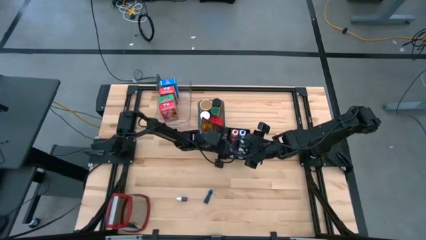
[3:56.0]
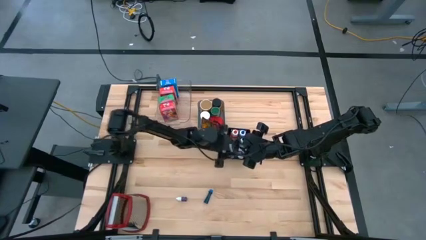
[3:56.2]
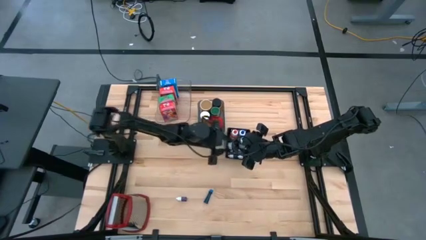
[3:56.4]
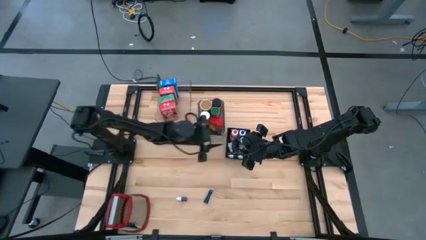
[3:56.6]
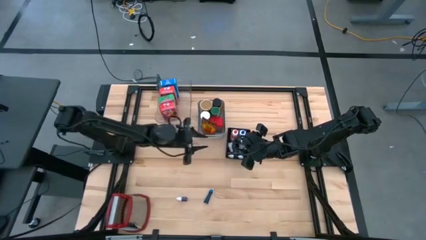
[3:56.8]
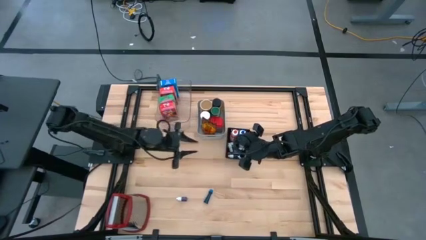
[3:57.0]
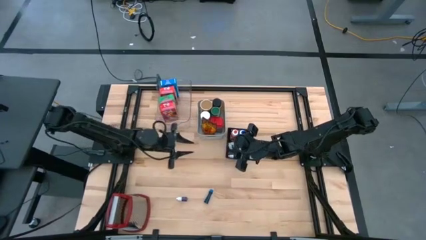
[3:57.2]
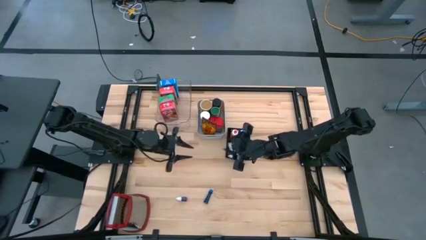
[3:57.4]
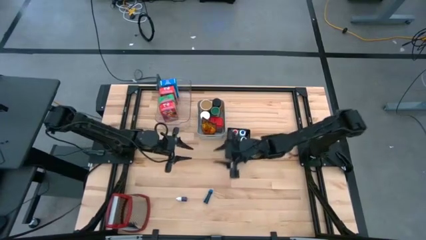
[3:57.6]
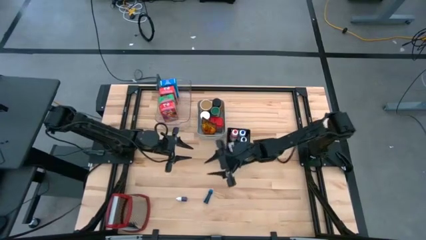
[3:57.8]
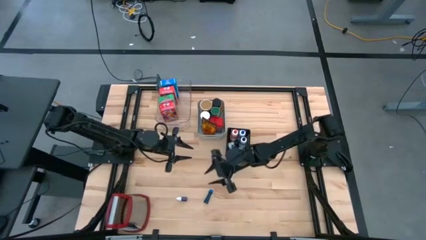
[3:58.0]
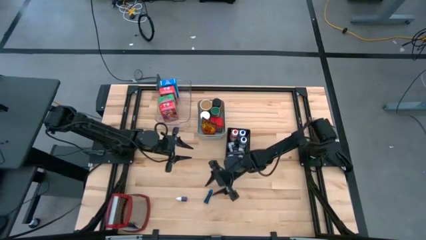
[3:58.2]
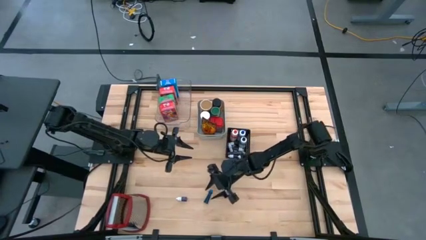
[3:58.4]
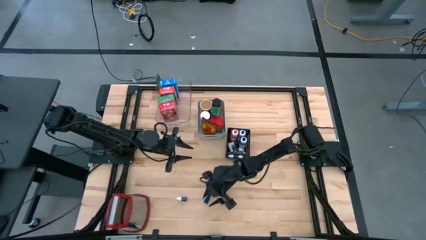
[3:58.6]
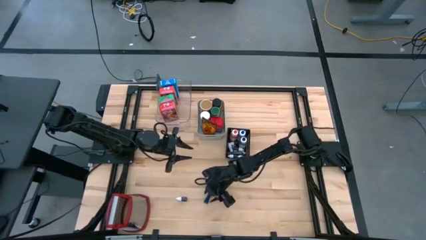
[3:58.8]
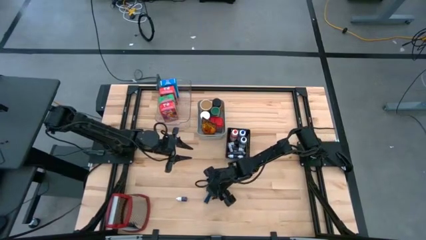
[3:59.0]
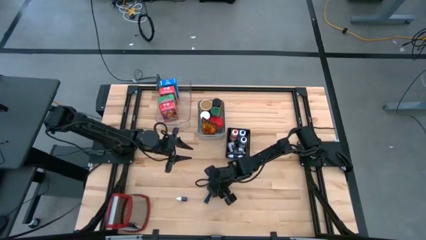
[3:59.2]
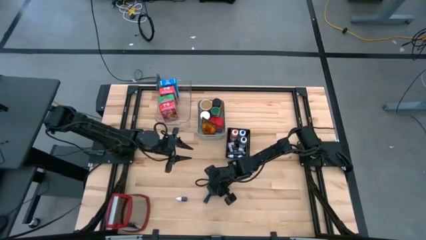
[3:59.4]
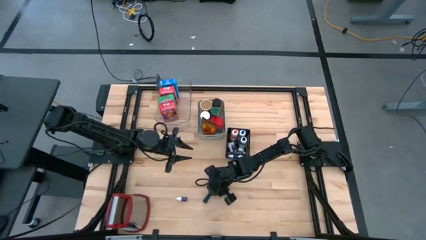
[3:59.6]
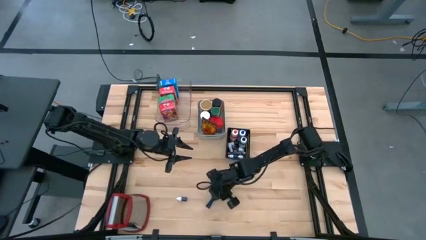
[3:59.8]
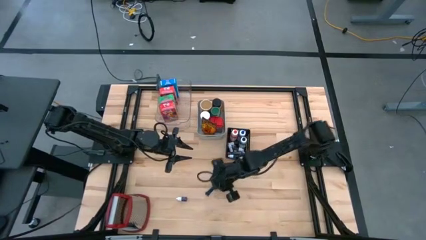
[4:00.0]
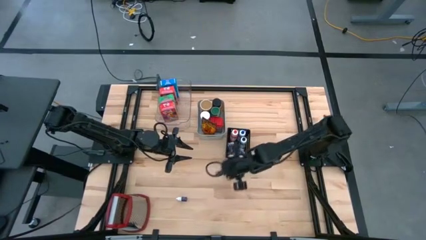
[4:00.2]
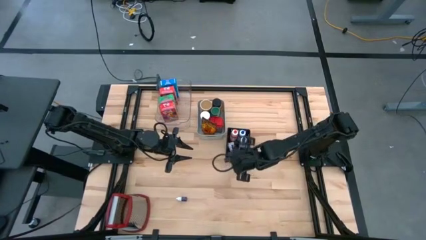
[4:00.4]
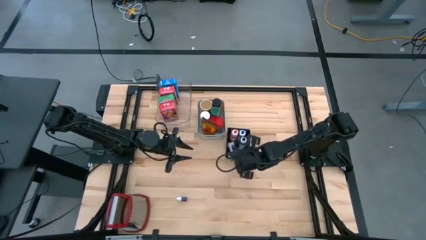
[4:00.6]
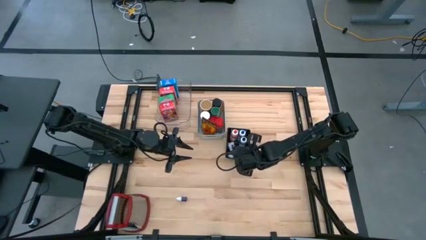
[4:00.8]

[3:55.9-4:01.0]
Task: Pick & Place Kitchen Items
Put the blue food coloring bottle into the black bin

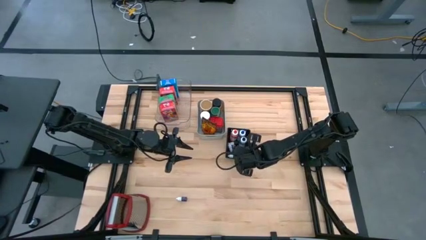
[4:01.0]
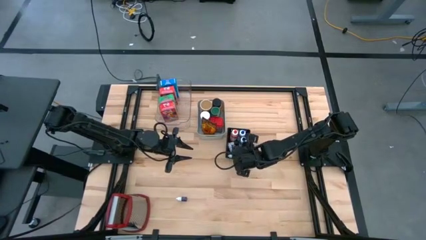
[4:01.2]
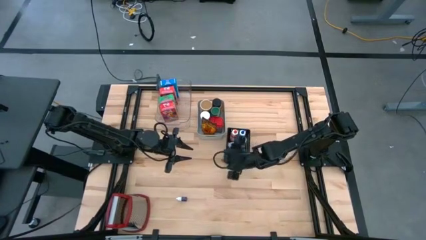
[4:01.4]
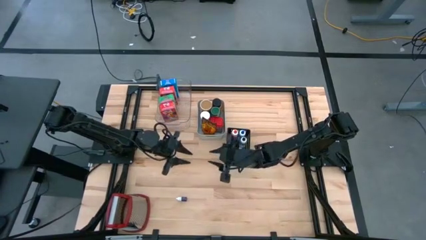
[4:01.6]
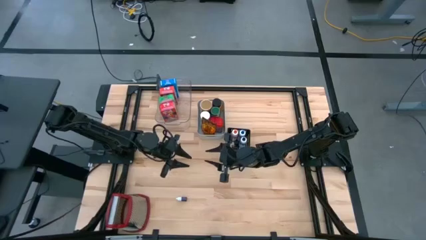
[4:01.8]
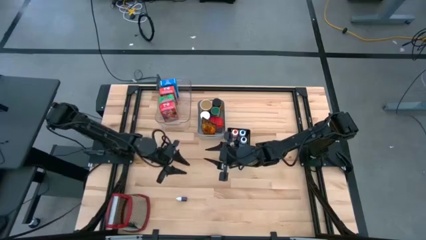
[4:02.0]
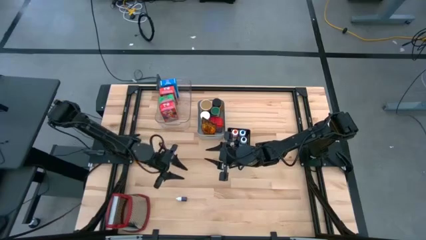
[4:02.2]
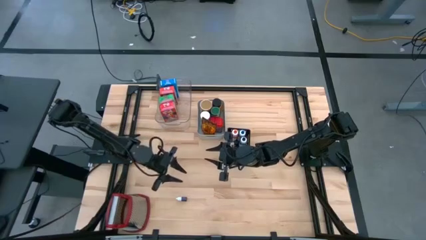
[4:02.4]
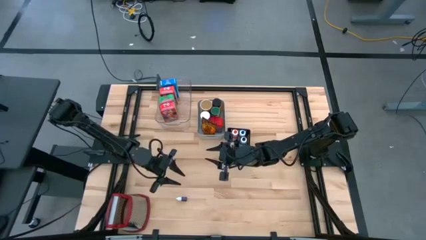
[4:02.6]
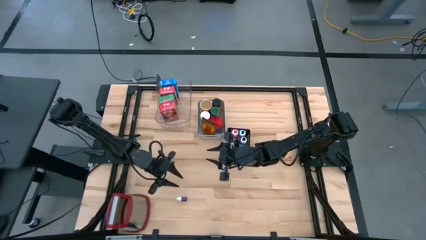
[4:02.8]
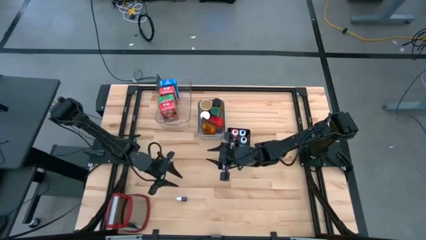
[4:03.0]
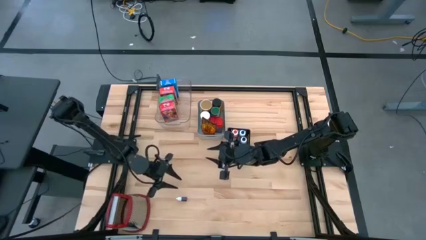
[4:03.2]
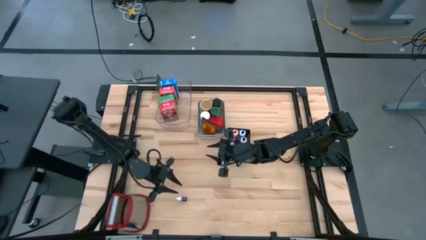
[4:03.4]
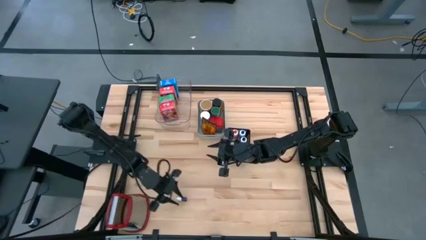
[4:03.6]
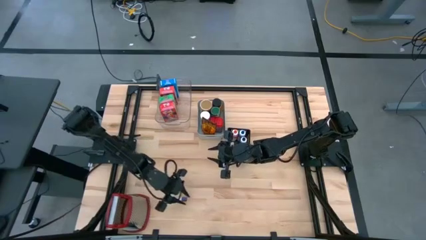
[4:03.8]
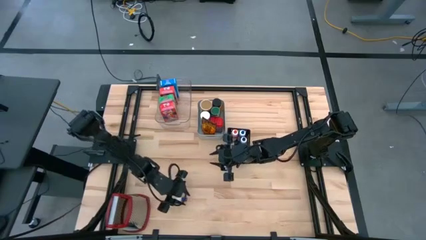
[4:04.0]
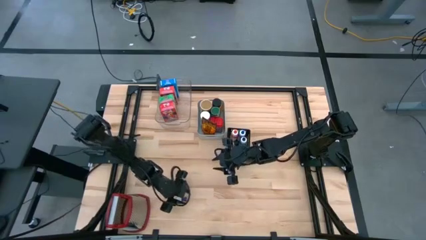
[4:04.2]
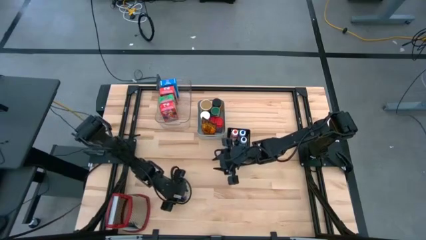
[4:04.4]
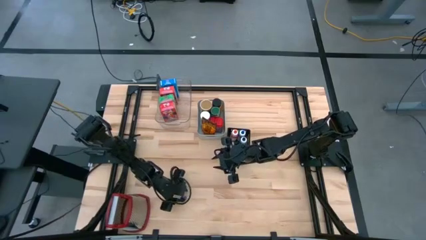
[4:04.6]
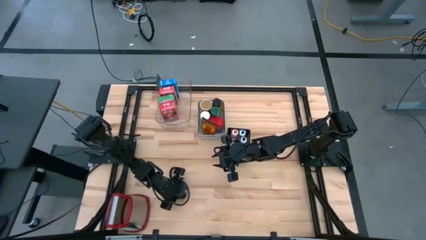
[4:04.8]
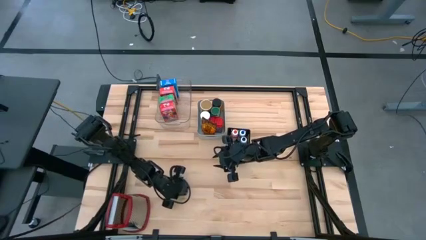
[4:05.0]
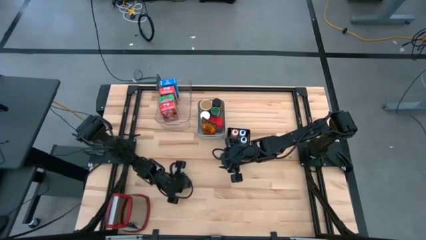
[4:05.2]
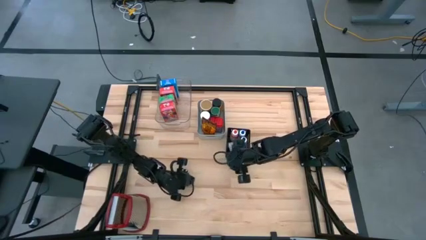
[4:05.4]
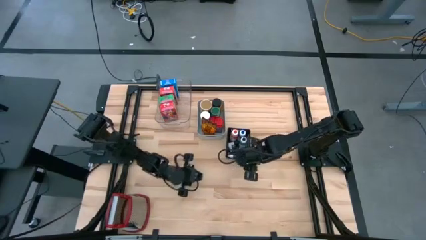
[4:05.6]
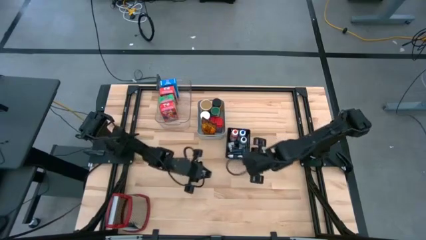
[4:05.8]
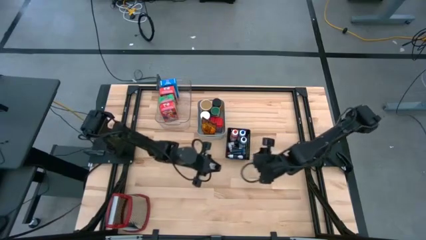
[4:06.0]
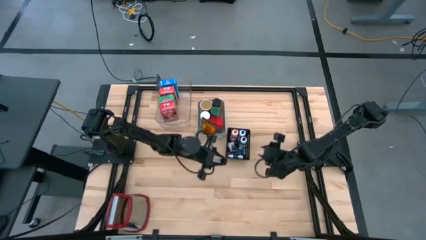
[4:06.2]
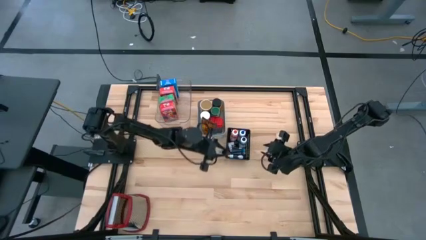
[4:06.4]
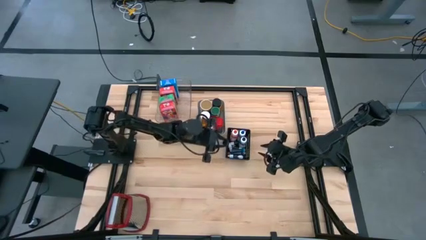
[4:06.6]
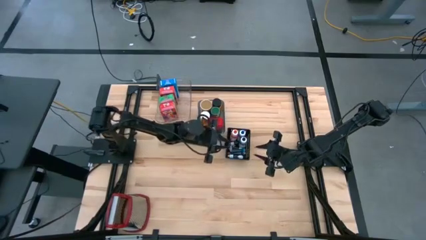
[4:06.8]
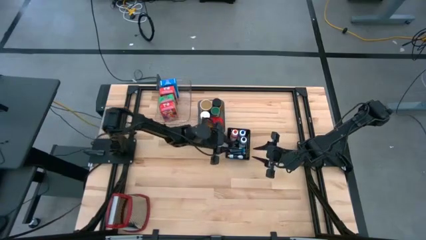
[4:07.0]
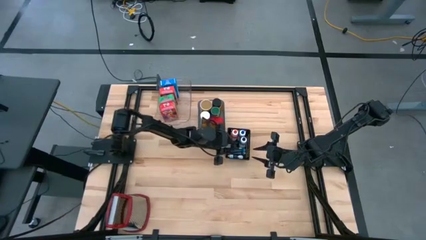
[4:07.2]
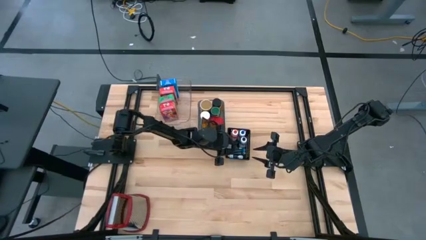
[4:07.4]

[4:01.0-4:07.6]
Put the purple food coloring bottle into the black bin

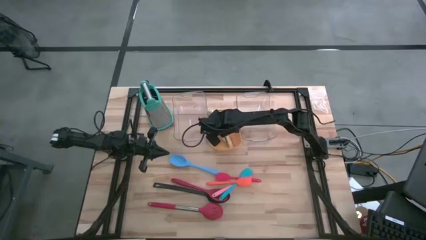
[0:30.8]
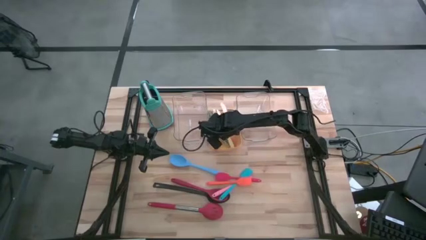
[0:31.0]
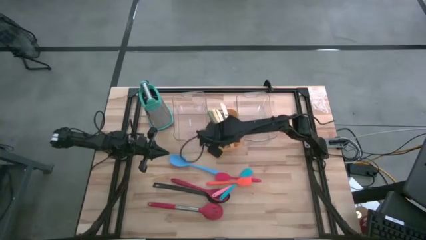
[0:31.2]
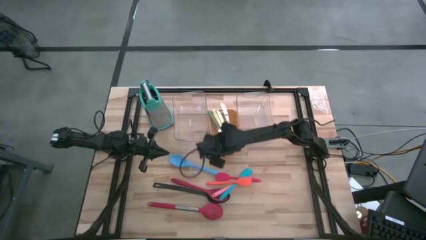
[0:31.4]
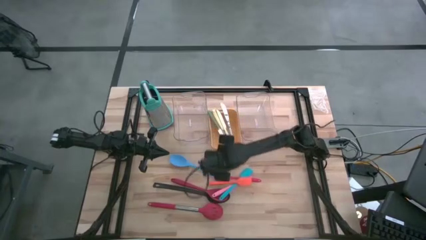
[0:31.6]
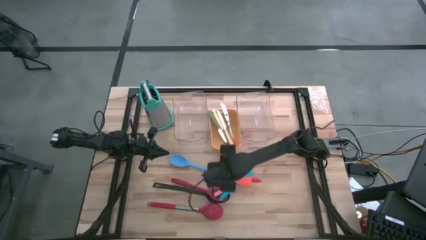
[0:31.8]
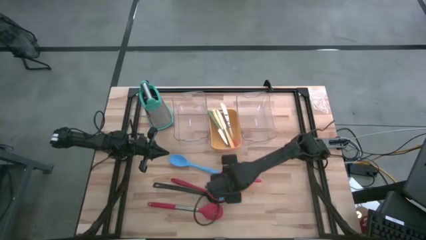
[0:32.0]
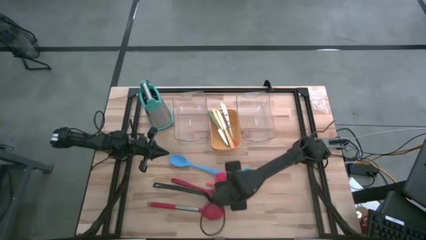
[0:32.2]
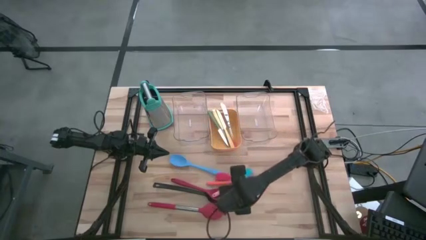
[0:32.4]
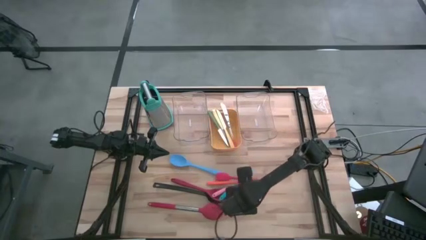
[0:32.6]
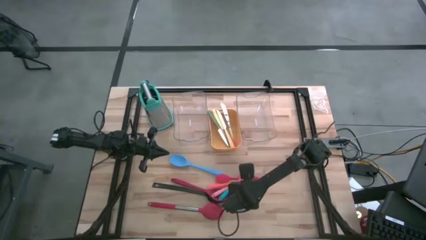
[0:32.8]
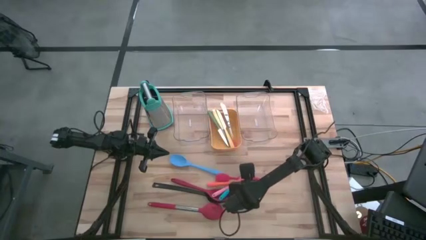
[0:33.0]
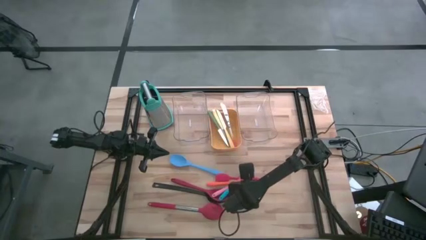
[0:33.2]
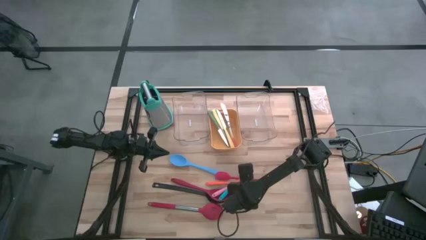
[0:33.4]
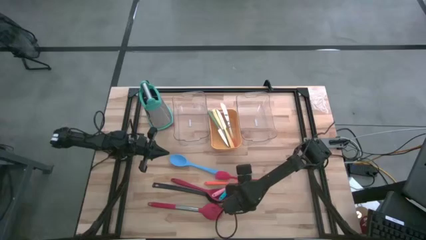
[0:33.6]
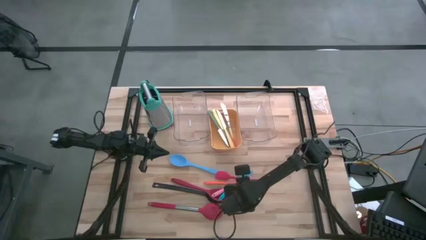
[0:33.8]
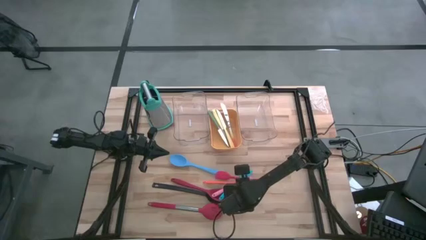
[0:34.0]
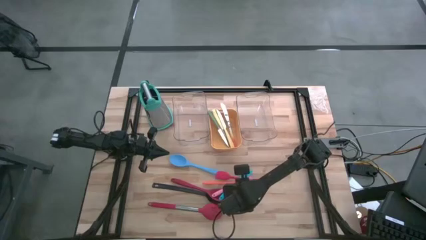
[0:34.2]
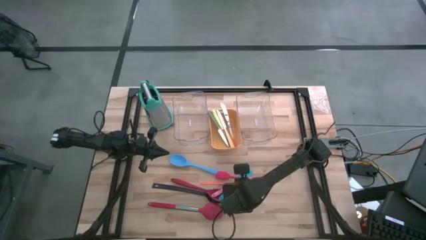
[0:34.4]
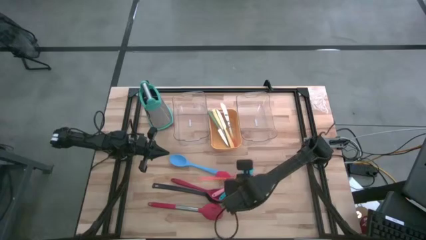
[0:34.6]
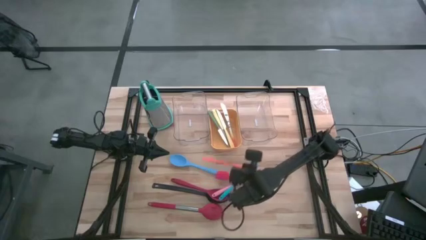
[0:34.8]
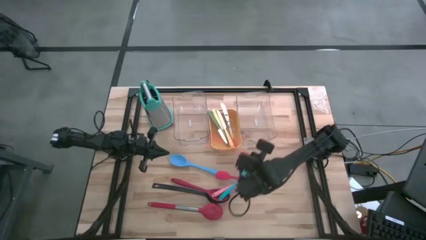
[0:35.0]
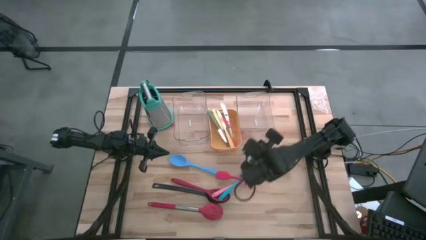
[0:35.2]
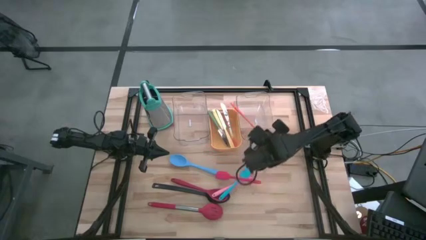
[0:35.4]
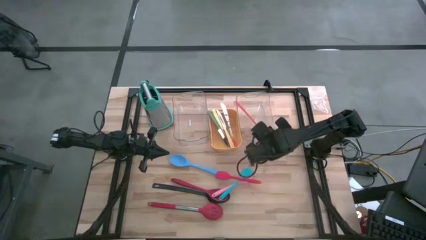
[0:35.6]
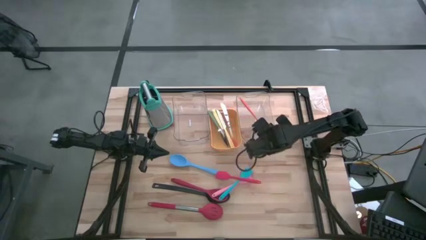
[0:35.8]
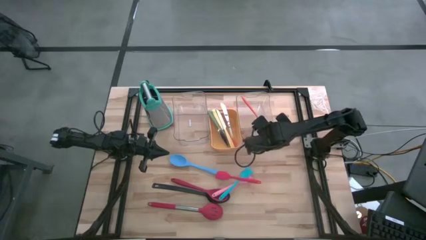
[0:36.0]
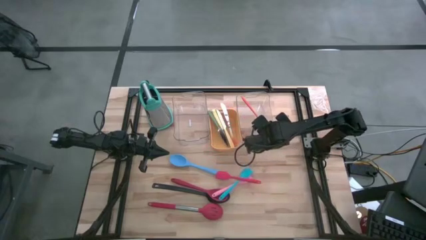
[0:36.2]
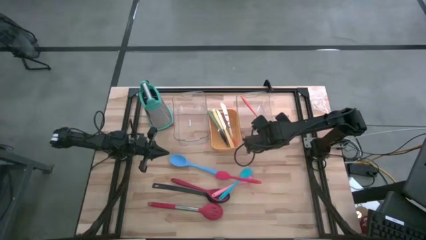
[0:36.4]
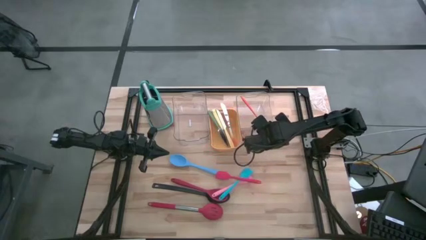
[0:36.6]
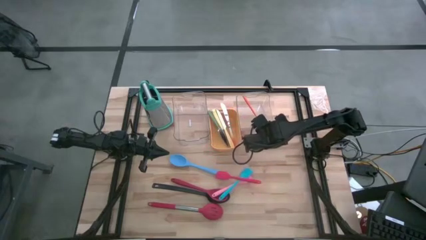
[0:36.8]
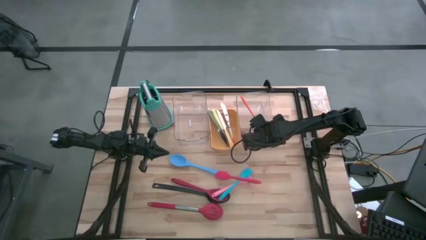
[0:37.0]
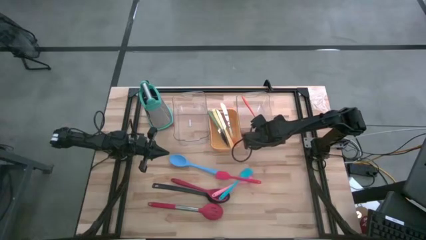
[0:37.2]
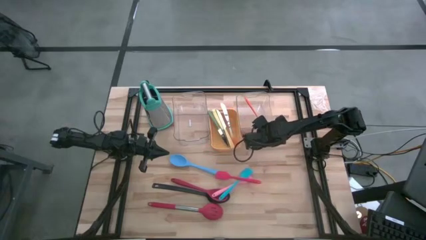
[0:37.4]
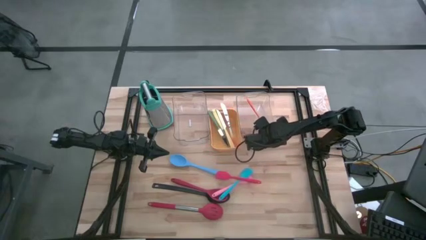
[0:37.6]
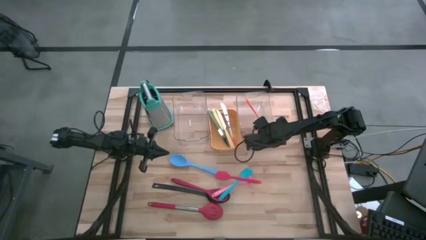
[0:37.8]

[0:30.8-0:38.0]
Task: Pick & Place Kitchen Items
Put the orange spatula into the right transparent bin
